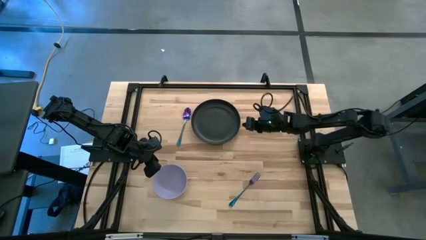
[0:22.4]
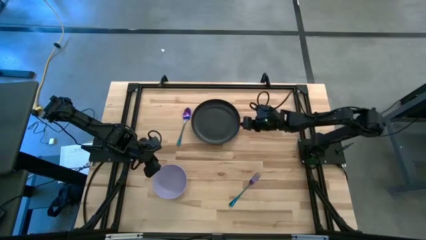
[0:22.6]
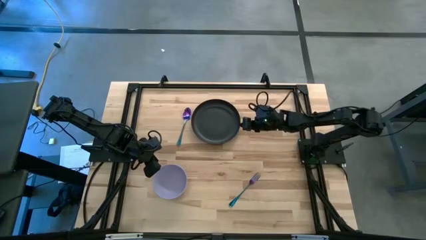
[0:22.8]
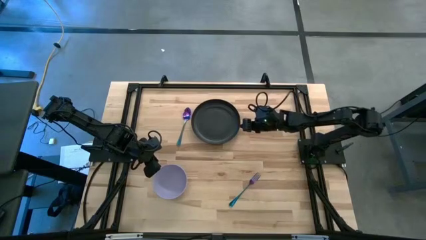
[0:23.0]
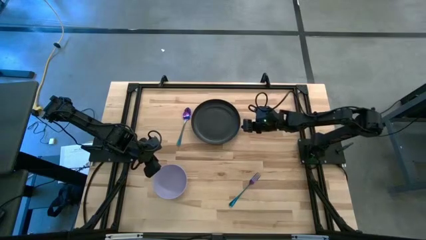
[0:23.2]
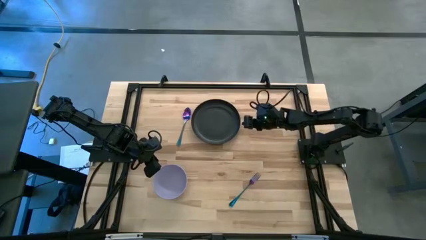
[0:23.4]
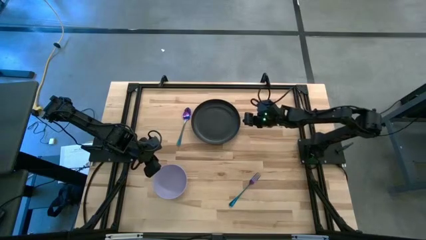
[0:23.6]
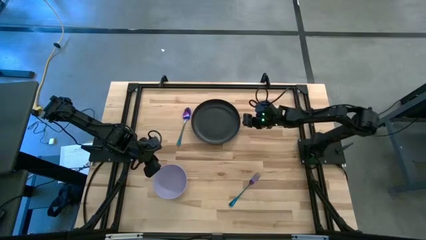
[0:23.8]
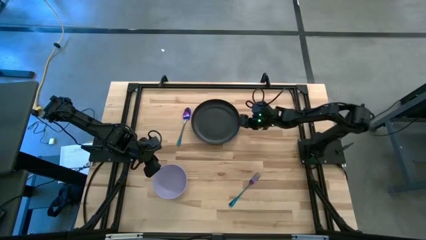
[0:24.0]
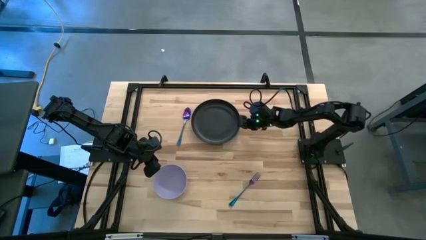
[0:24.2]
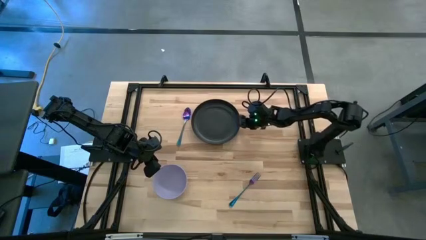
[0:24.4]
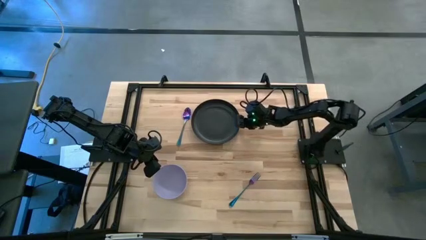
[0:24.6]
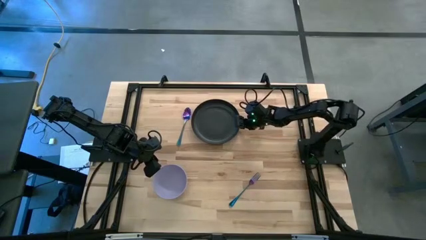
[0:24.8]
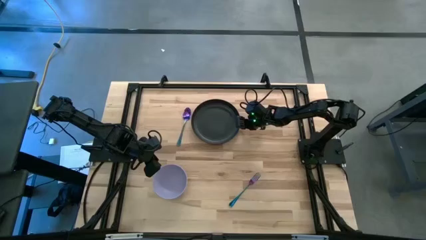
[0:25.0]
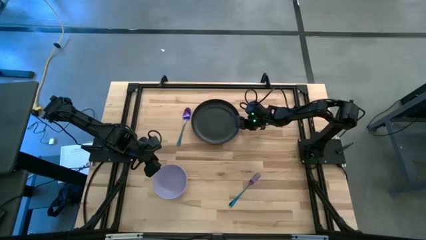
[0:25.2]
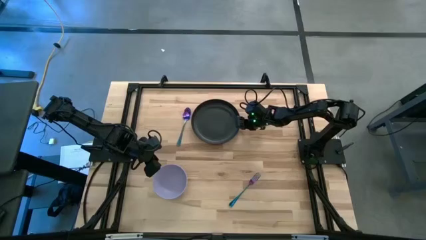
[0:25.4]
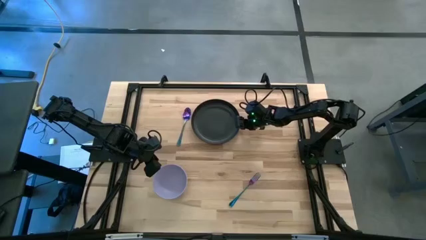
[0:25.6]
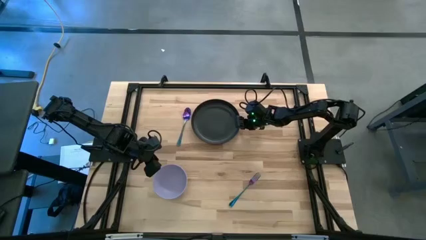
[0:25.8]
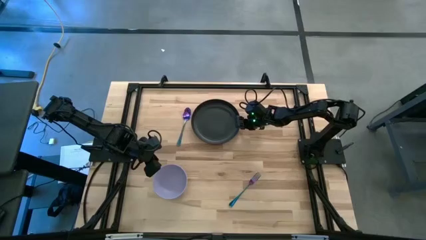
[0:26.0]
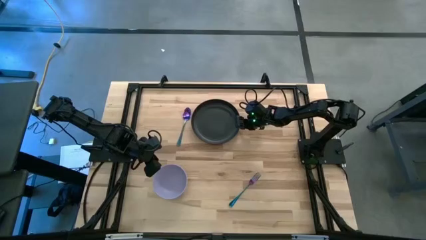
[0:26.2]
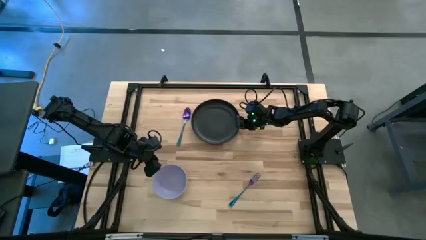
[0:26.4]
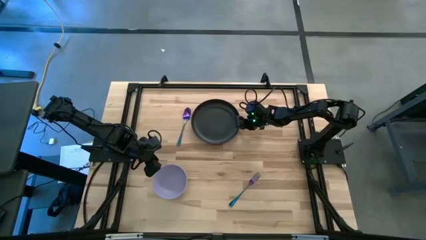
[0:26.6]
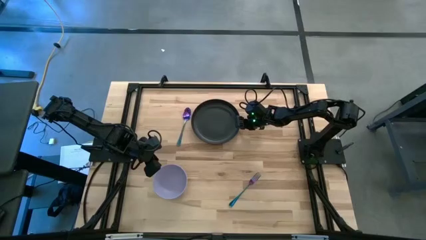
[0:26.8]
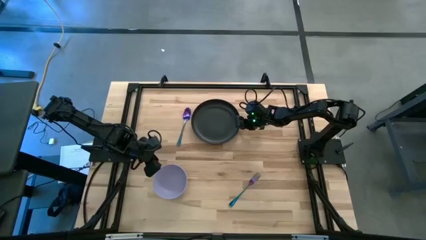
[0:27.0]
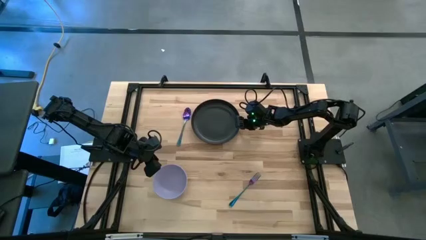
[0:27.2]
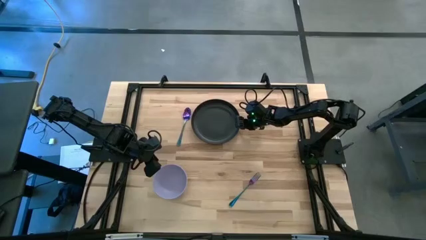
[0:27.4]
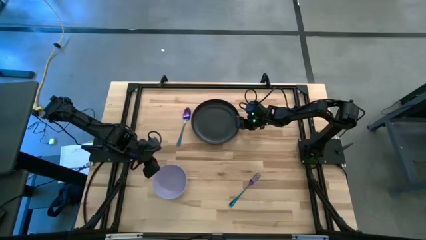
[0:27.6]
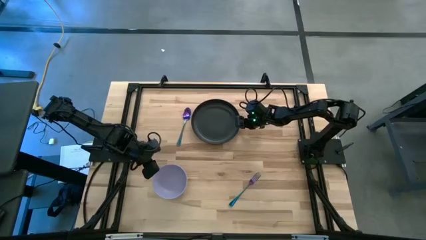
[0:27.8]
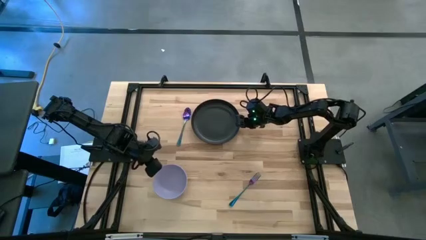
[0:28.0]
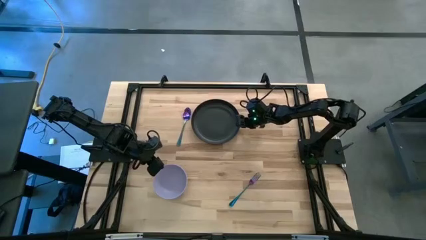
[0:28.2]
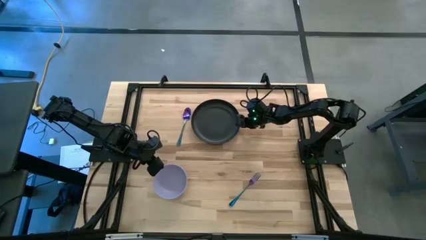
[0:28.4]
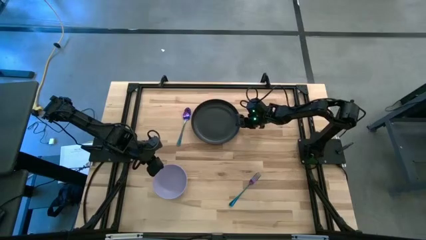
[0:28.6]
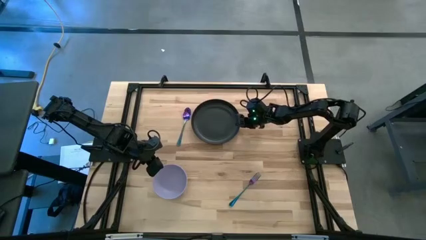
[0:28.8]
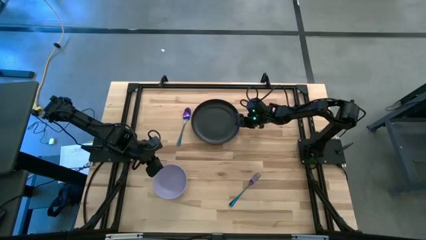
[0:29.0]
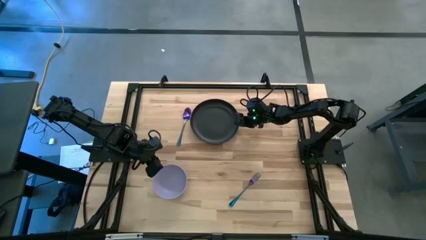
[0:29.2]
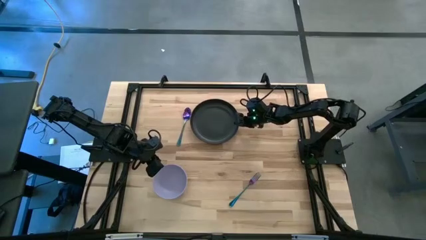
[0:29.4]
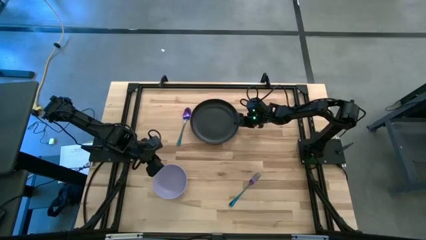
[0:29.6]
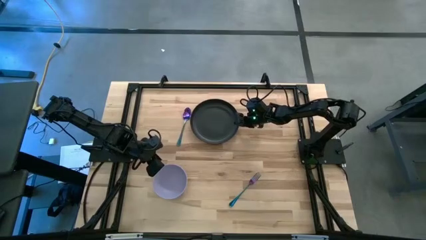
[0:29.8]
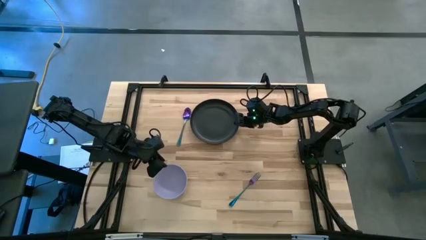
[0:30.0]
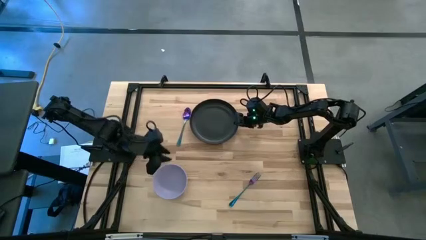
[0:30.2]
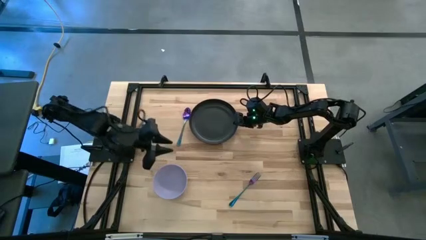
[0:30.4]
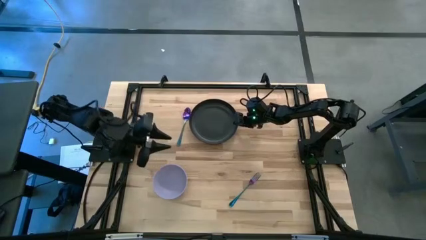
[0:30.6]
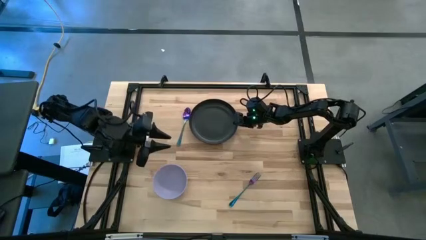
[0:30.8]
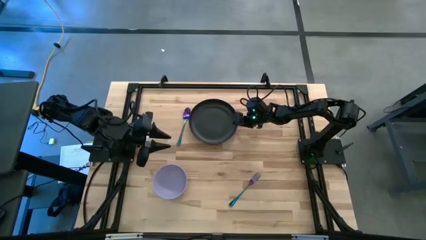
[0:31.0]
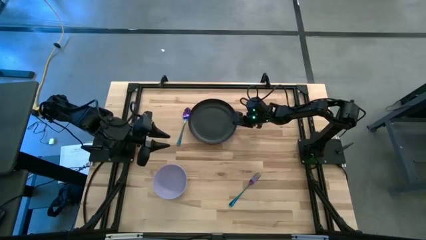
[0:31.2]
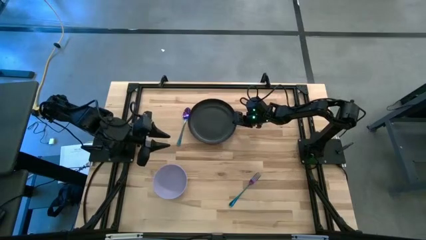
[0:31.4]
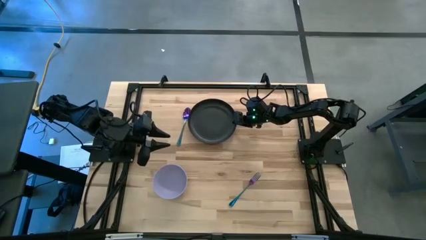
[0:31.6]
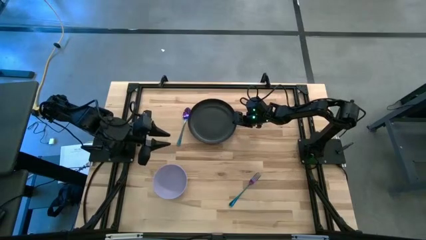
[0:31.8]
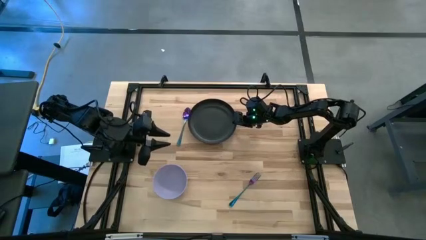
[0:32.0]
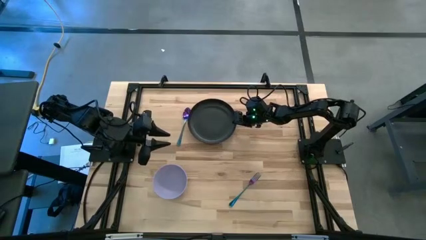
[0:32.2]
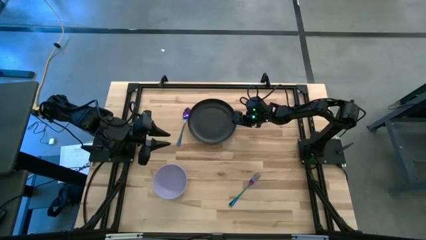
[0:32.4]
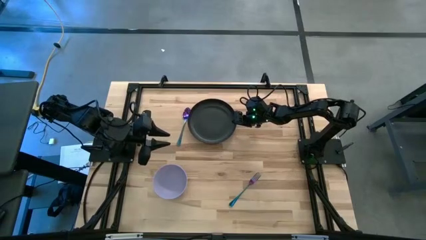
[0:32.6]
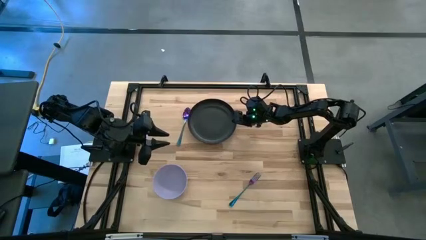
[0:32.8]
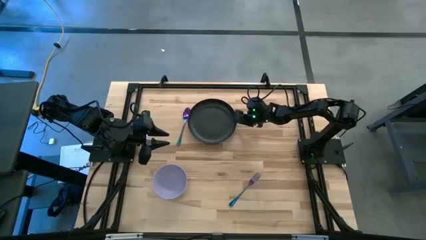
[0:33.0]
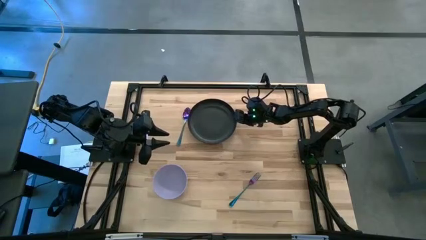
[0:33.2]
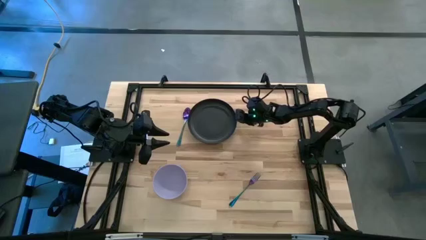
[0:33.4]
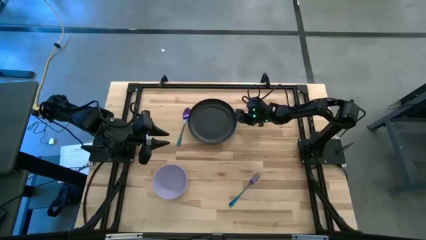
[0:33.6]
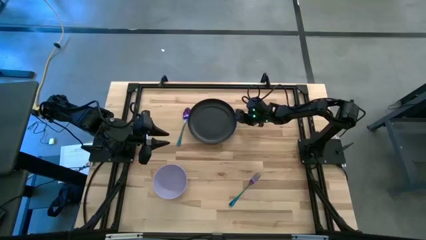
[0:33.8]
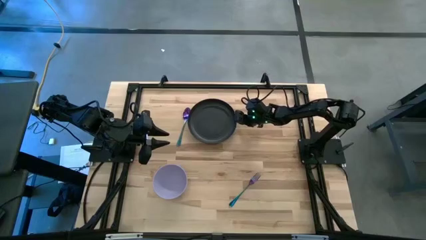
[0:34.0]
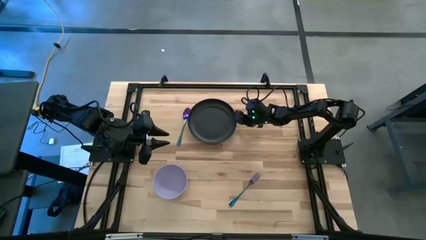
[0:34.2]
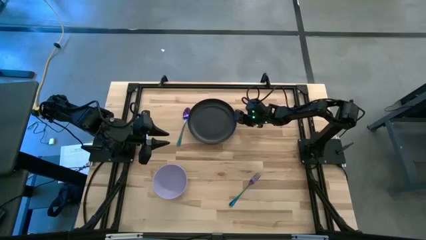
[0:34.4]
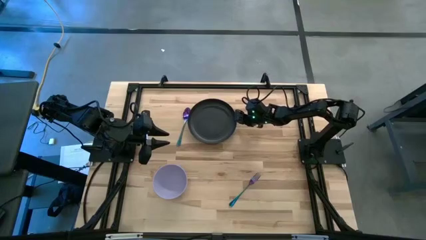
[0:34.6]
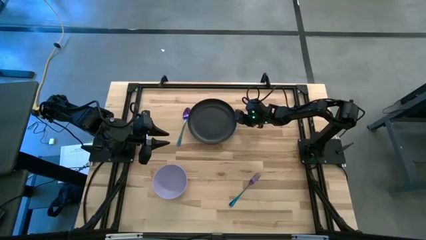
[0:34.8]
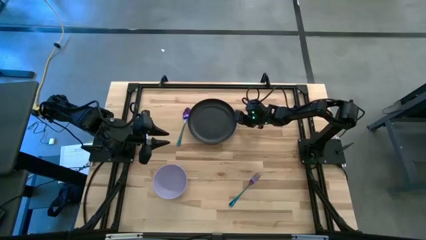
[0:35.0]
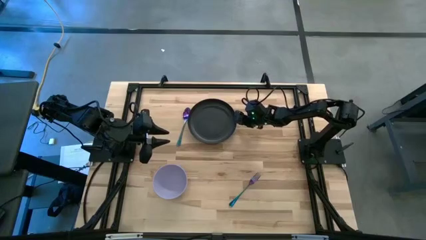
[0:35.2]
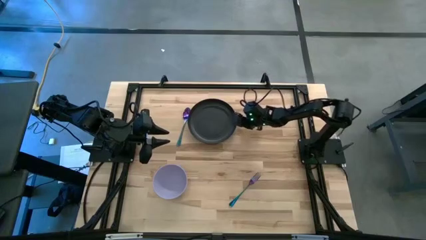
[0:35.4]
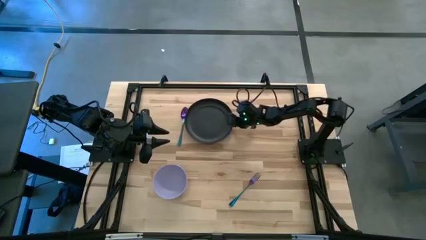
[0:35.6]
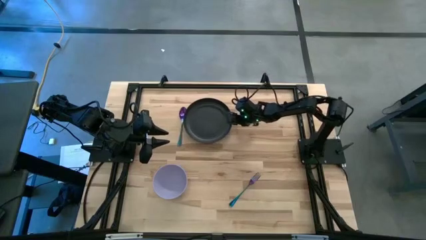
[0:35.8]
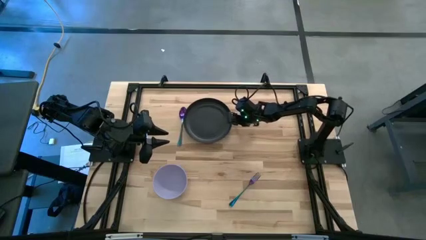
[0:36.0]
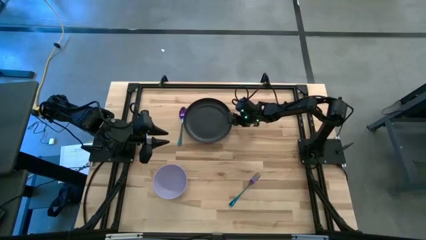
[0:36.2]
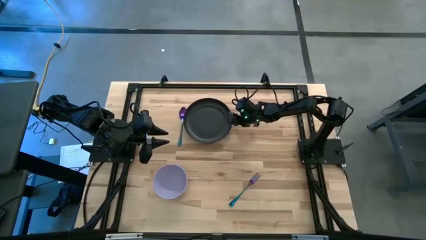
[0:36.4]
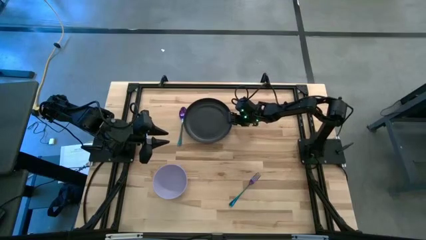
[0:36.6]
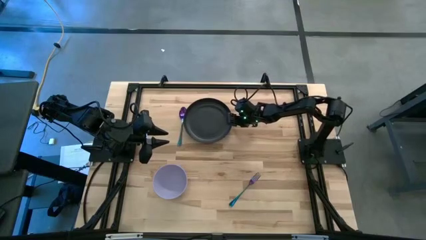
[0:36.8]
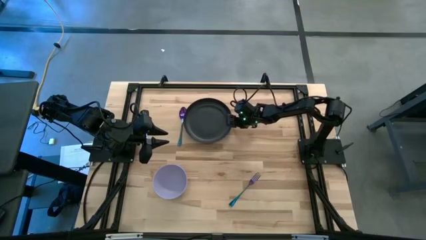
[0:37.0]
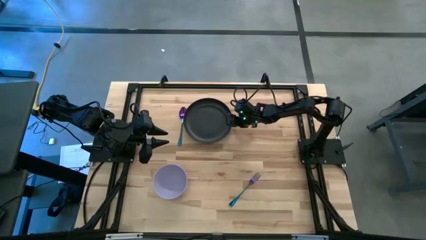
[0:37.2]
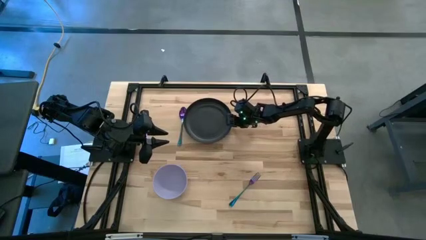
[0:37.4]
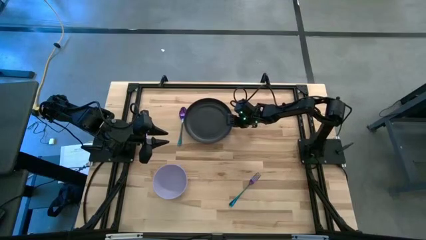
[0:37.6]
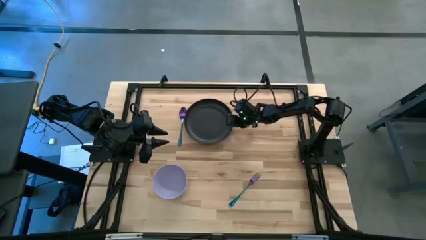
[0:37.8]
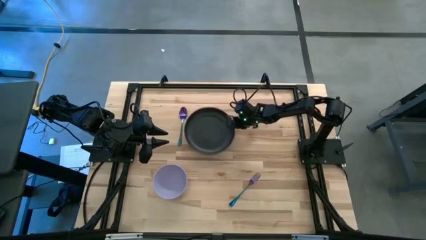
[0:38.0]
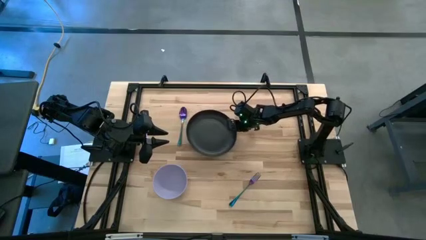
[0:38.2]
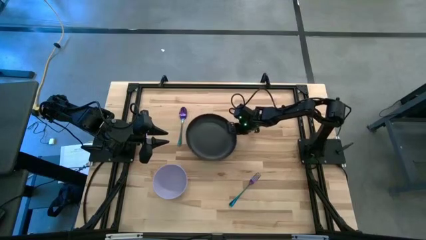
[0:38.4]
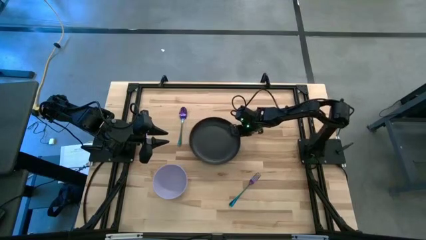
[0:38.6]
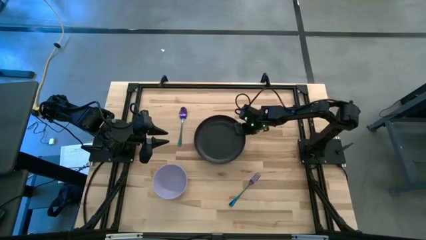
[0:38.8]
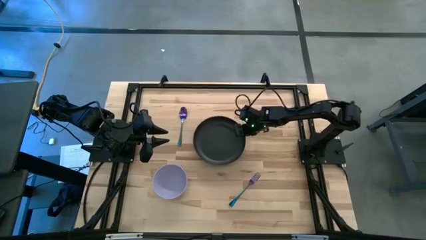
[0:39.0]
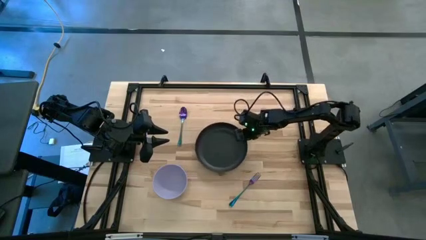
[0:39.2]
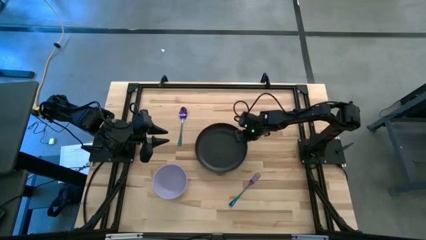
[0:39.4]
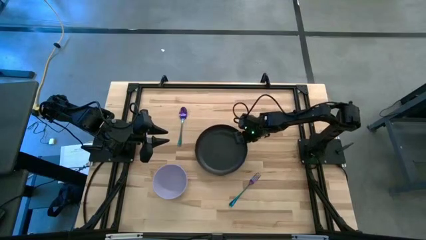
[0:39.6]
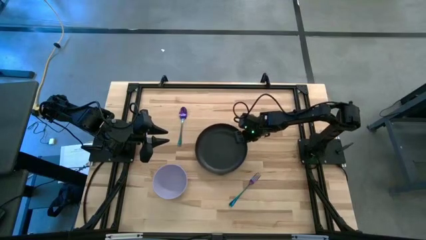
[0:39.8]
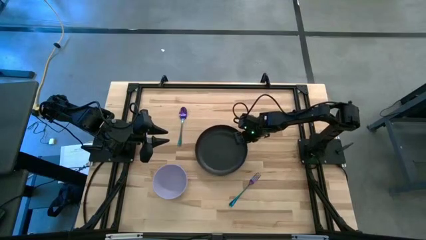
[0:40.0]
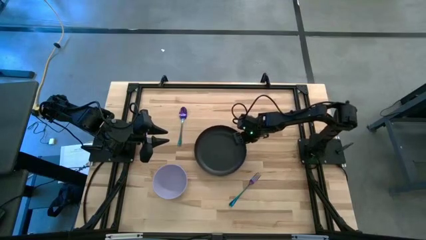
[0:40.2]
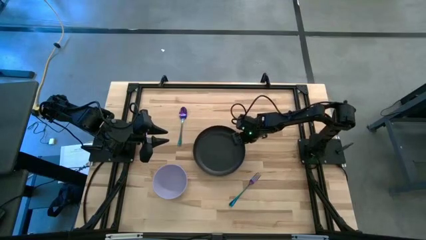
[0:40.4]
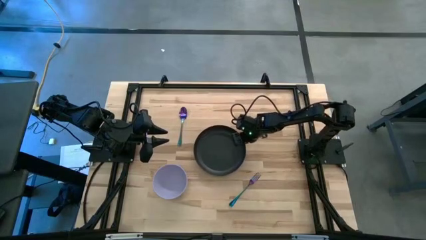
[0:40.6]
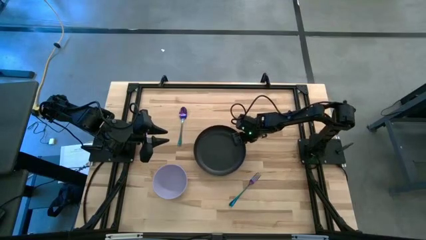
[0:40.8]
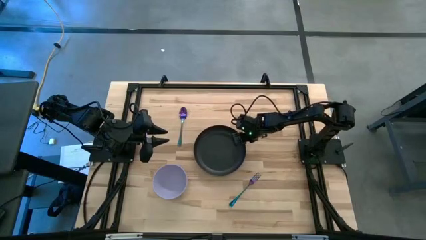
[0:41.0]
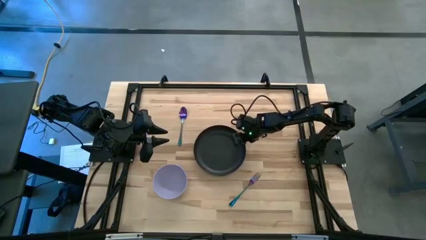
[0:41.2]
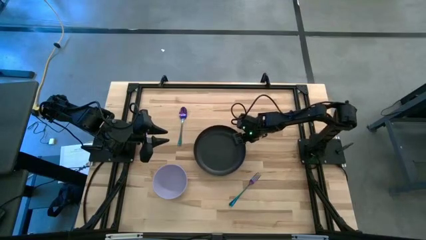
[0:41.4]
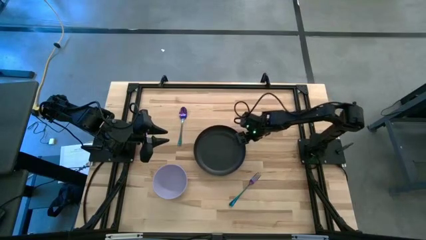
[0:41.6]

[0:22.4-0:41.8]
Task: Set table place
Move the black plate to the center
